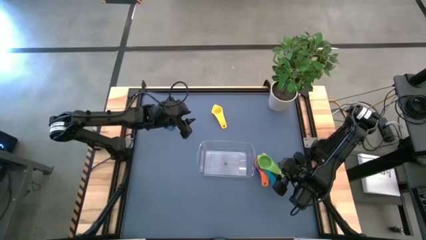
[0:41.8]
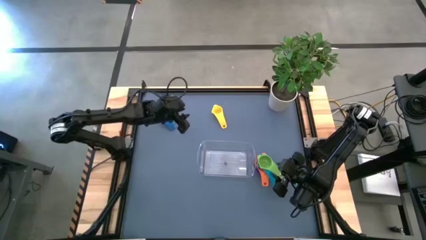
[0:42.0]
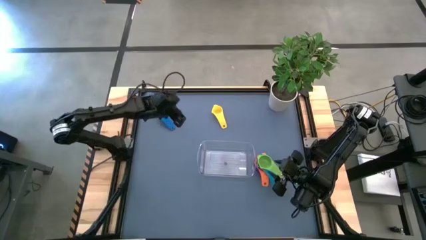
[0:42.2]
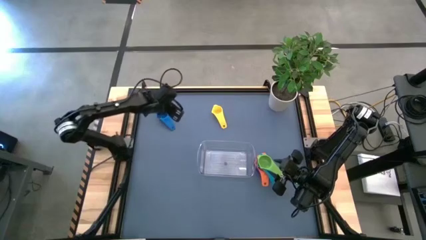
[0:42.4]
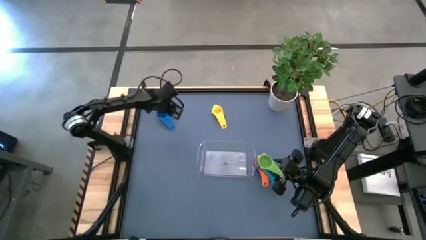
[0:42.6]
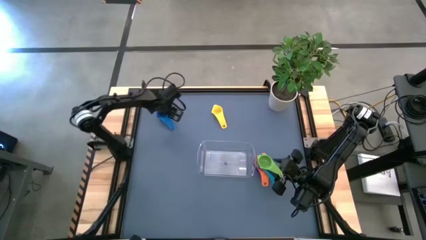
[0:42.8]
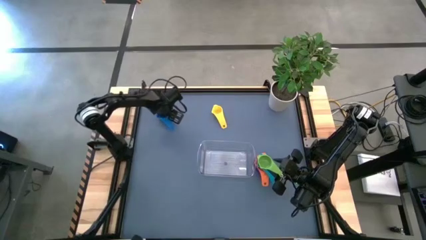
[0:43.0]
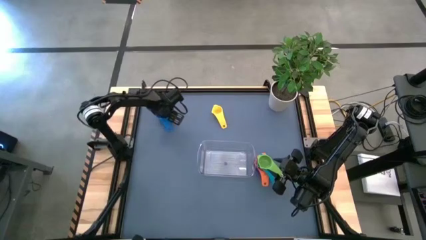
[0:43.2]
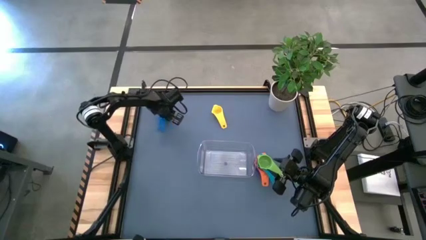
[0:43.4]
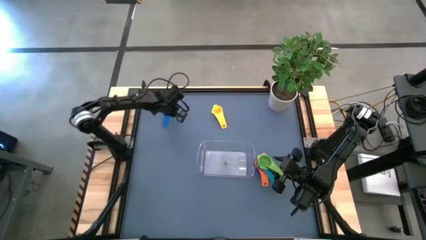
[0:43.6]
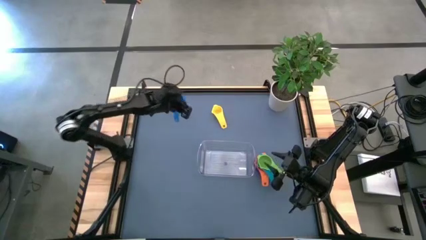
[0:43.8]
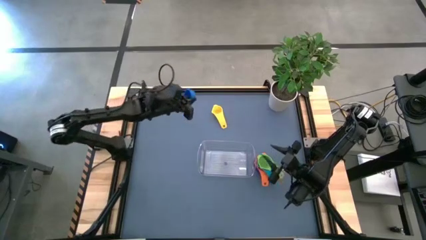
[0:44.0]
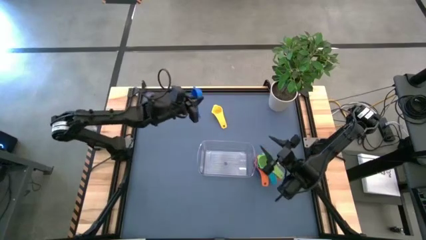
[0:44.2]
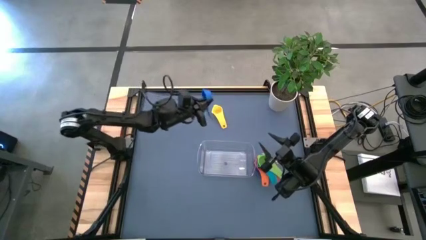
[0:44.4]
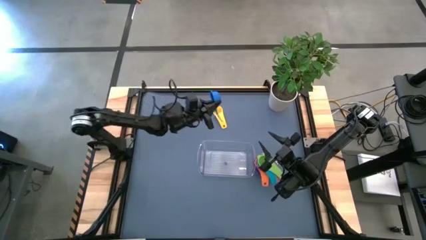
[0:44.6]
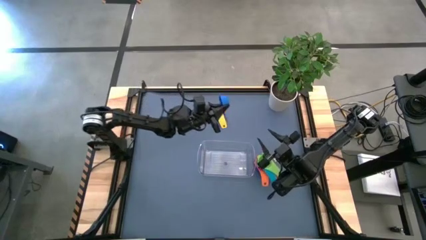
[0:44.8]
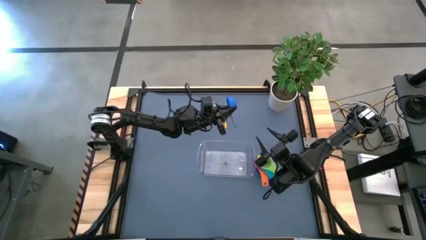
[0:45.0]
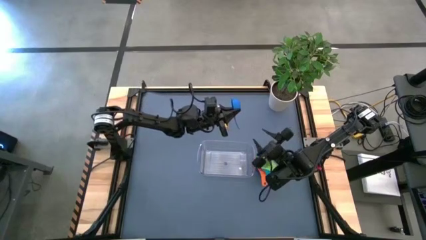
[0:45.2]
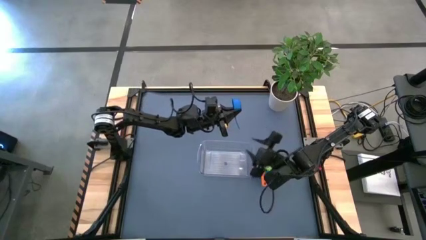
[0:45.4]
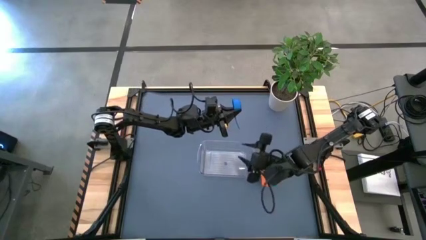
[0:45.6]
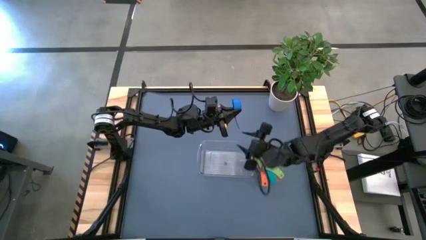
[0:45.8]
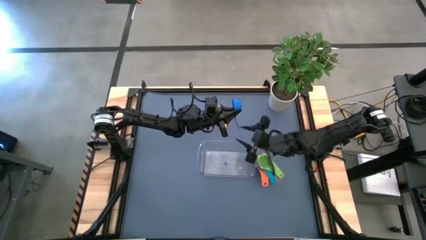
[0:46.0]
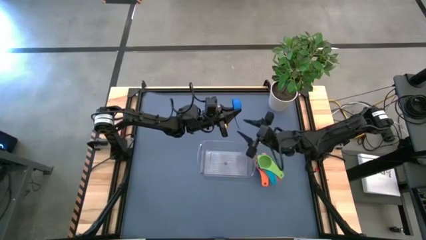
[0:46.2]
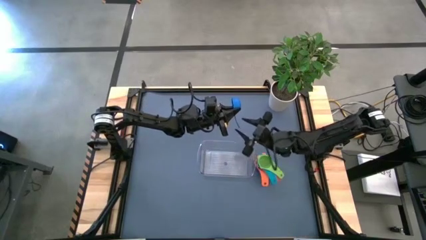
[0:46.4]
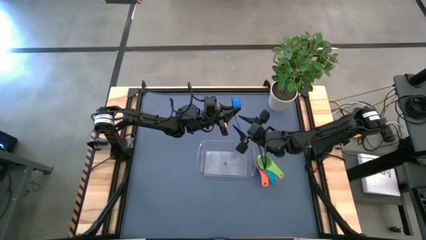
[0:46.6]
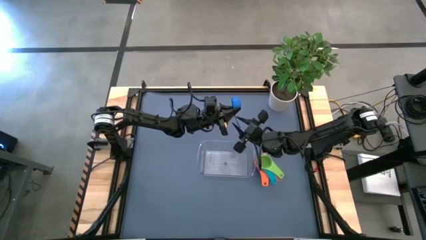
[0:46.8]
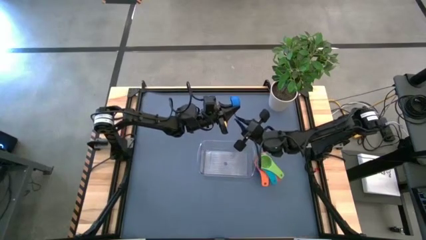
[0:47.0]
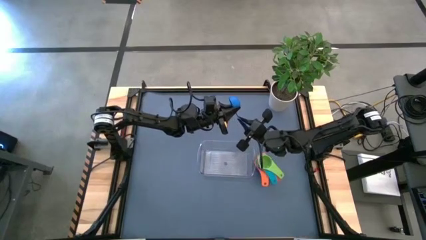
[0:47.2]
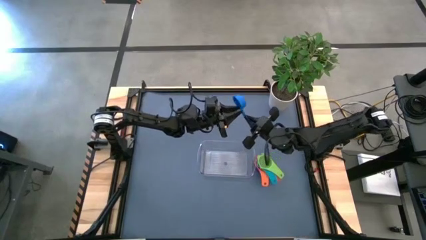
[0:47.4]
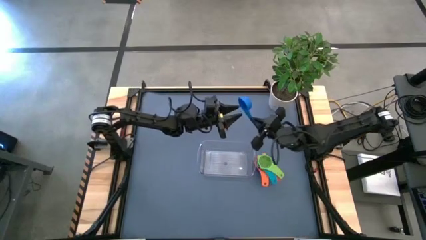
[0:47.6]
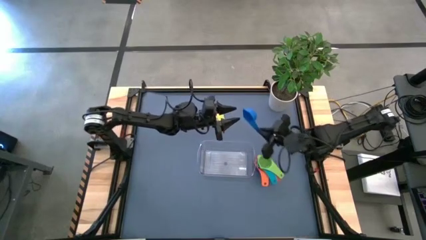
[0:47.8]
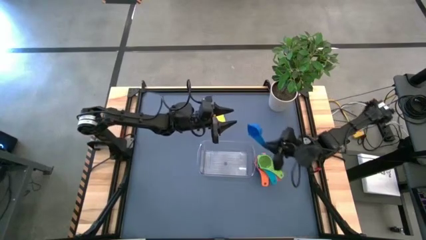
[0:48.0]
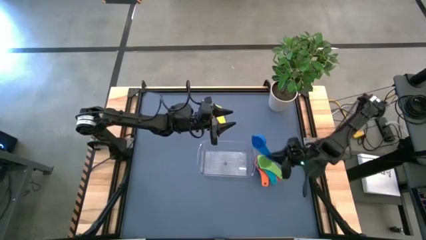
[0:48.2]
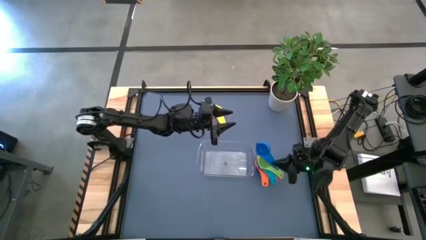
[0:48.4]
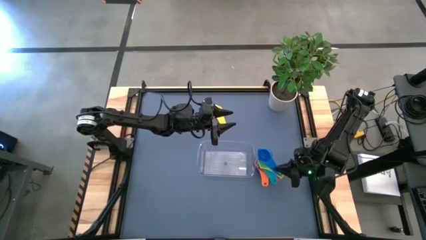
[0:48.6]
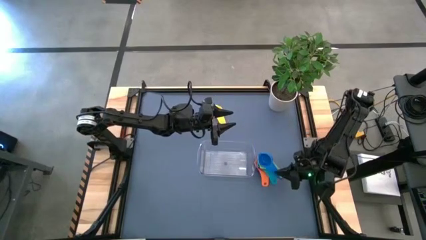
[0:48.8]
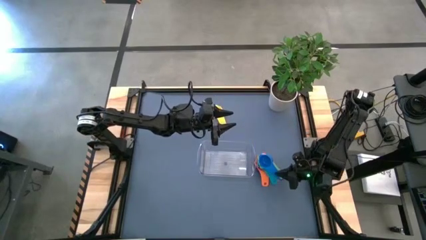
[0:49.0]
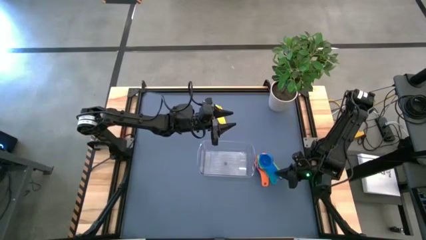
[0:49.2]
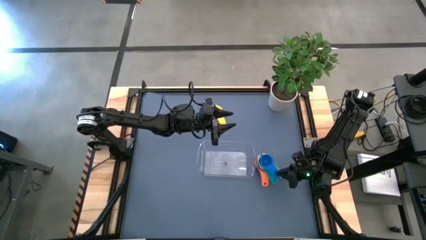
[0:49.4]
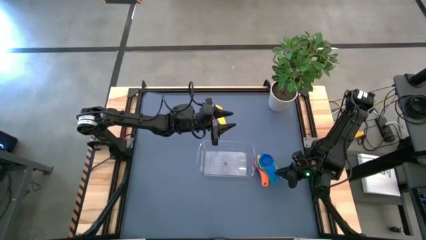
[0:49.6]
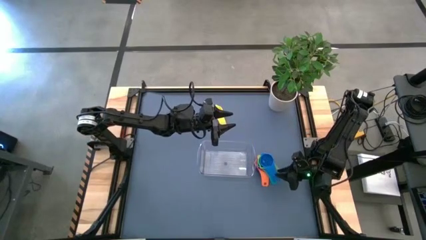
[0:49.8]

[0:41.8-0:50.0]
Task: Nest measuring cups in basket
Stack the blue measuring cup on top of the green measuring cup

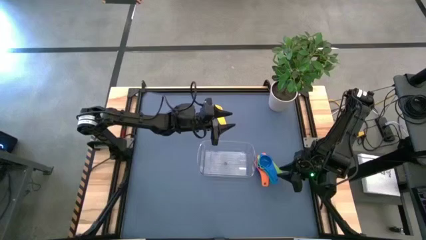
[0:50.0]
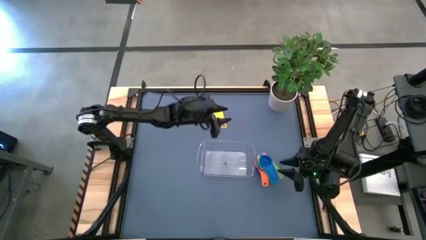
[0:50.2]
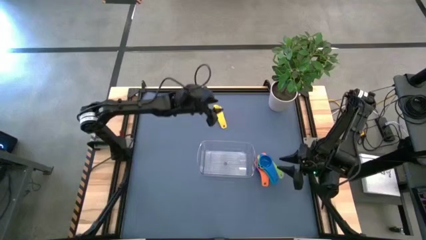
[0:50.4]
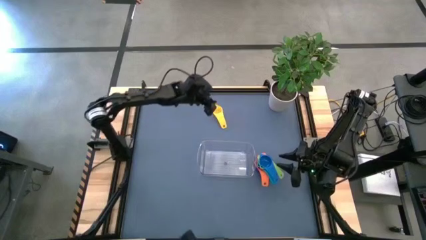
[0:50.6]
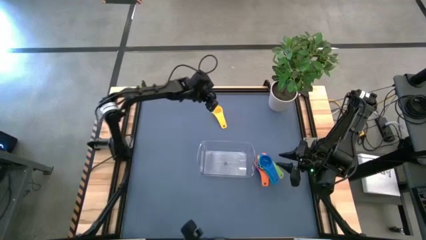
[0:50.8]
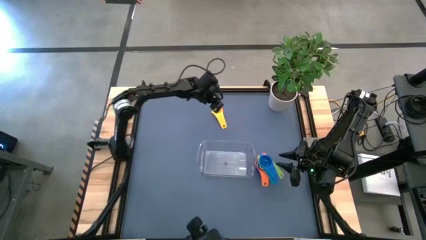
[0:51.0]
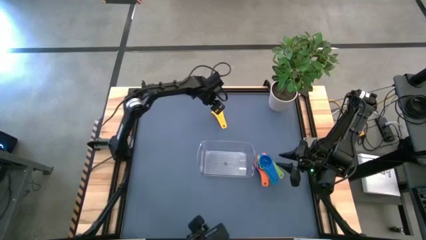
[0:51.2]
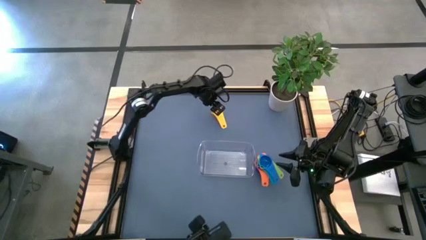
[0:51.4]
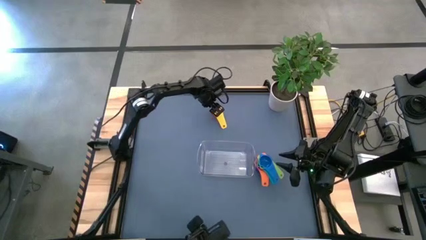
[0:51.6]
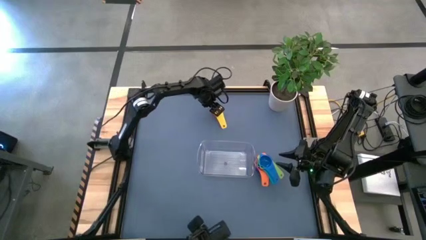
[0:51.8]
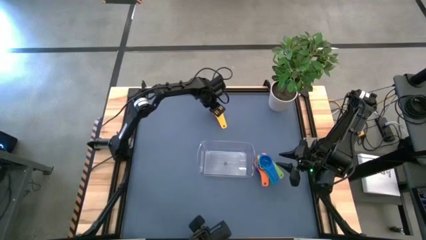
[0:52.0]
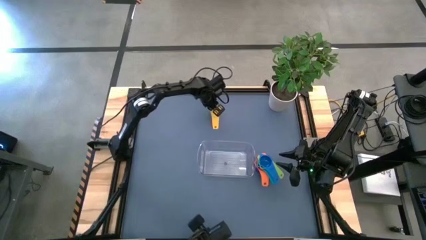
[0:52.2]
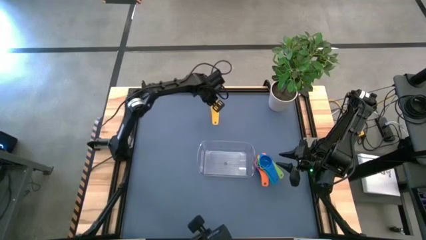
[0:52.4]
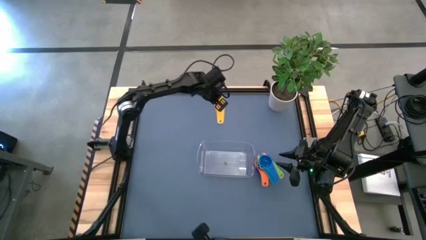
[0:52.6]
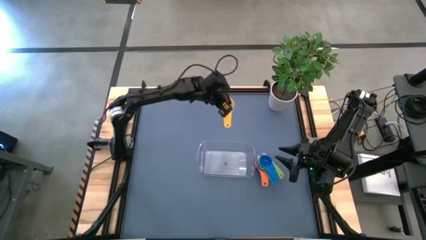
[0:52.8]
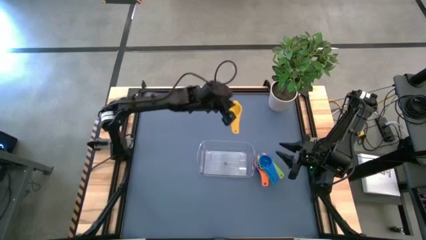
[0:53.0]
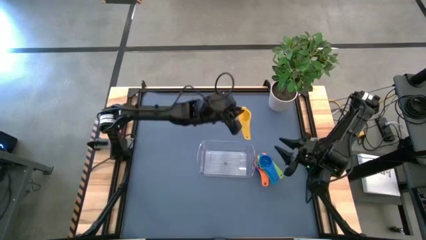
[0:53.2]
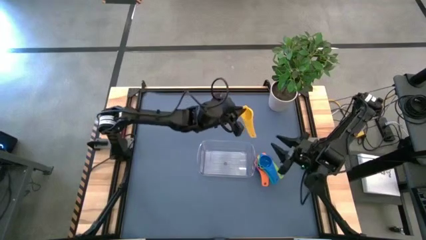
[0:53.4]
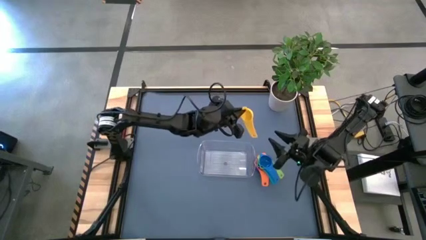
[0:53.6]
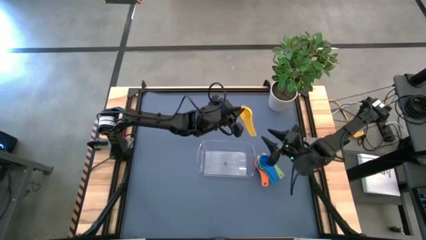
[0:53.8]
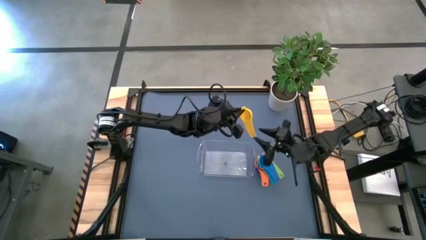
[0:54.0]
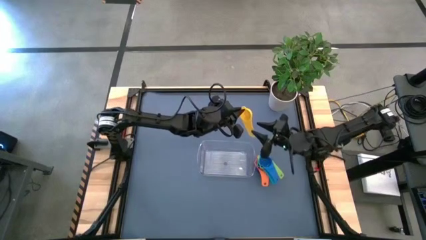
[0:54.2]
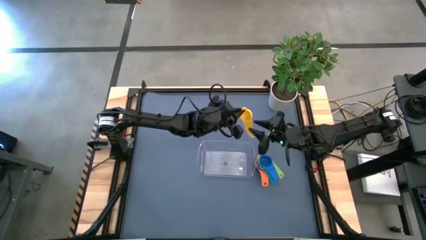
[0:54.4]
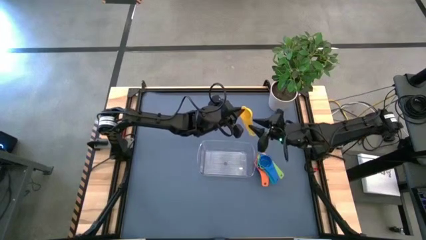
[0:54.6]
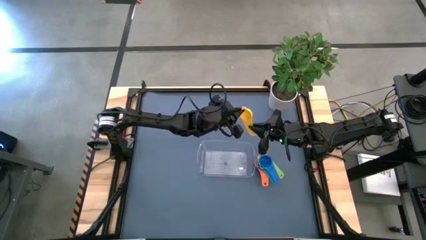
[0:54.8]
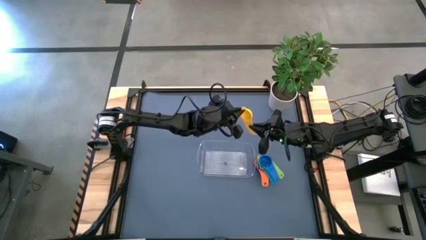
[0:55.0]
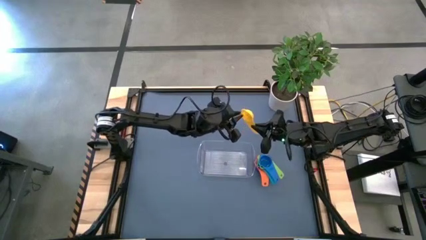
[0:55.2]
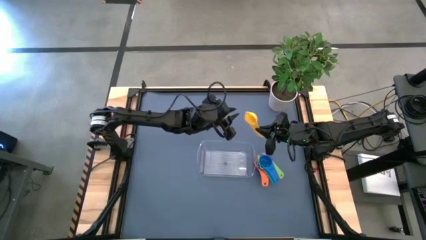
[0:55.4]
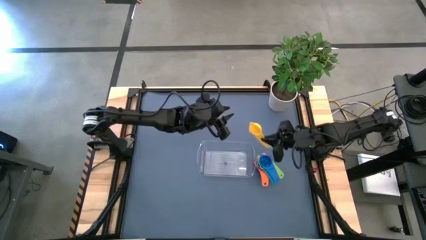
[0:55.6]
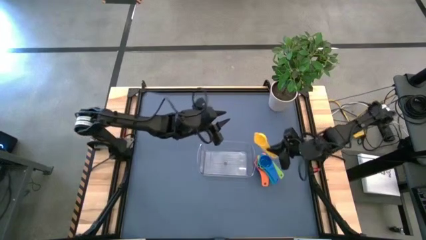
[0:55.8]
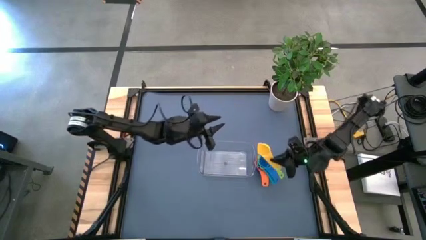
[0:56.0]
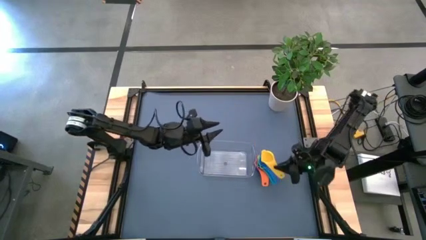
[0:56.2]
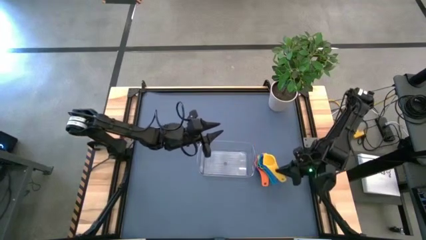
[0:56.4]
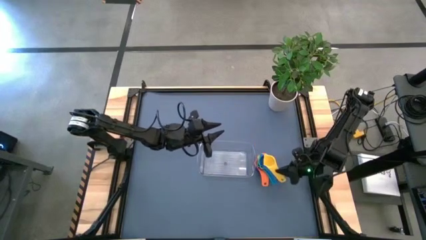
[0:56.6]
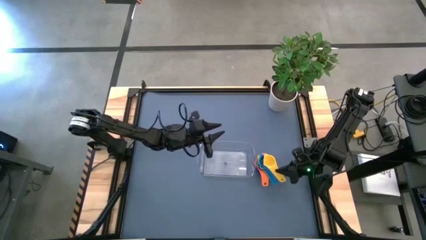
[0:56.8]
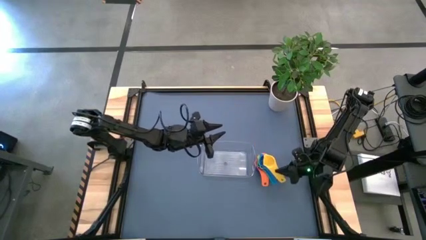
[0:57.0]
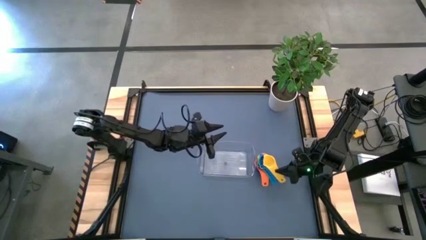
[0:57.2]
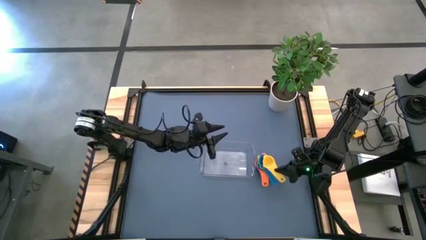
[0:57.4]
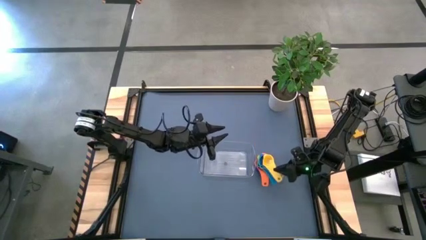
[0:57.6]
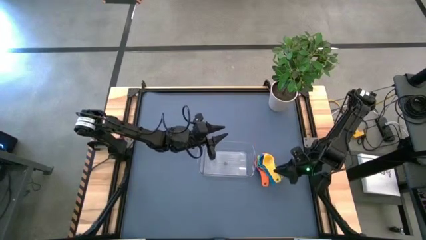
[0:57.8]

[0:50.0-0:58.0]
Stack the yellow measuring cup on top of the blue measuring cup
